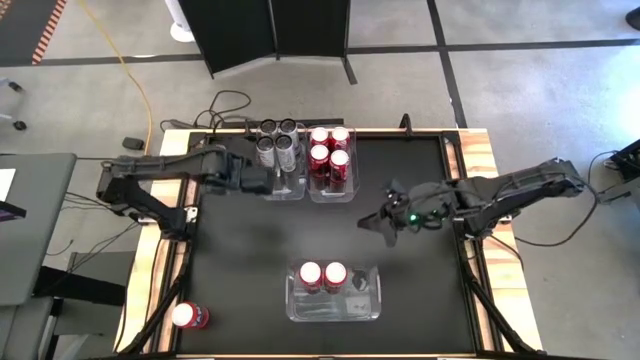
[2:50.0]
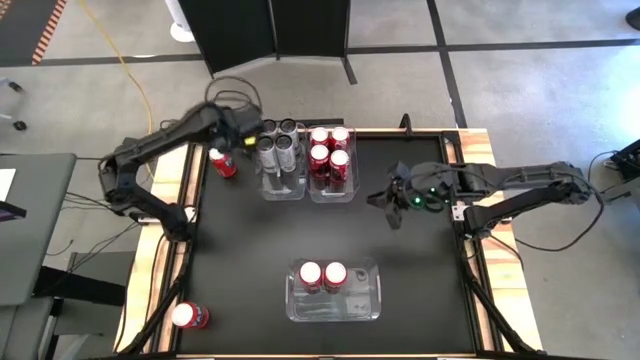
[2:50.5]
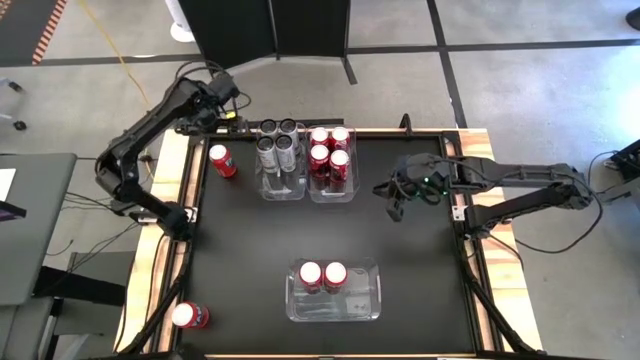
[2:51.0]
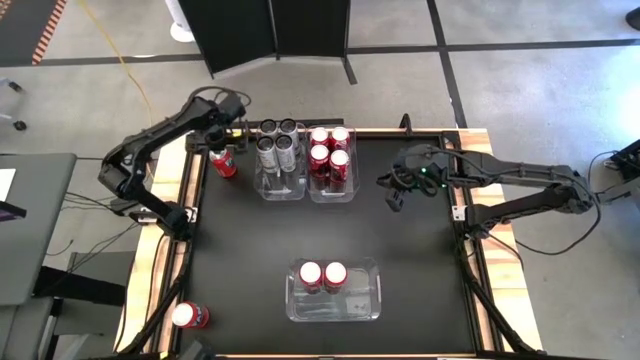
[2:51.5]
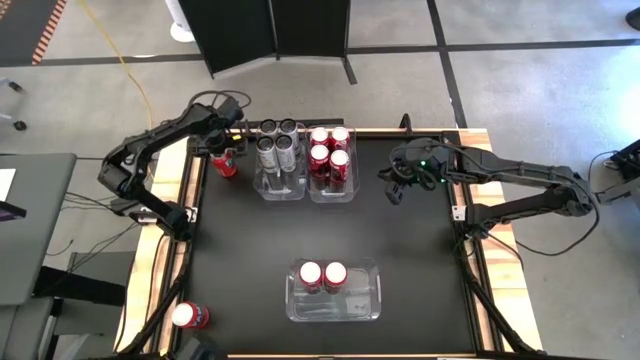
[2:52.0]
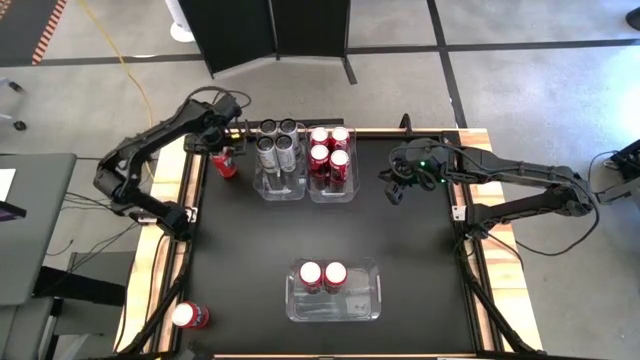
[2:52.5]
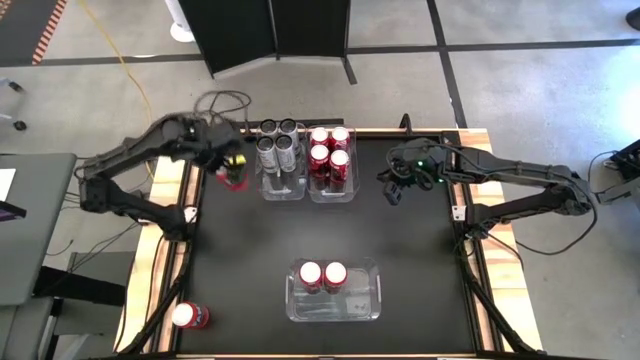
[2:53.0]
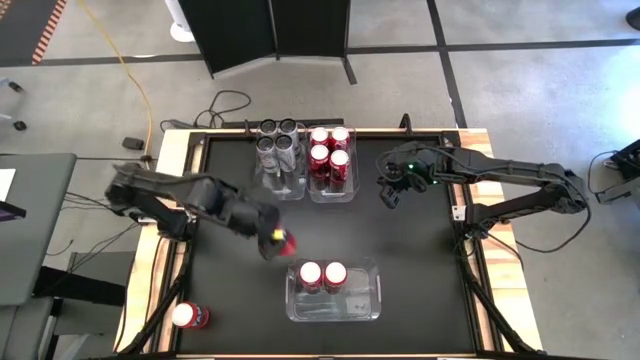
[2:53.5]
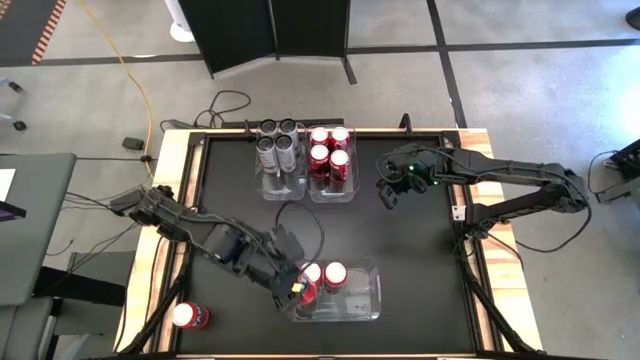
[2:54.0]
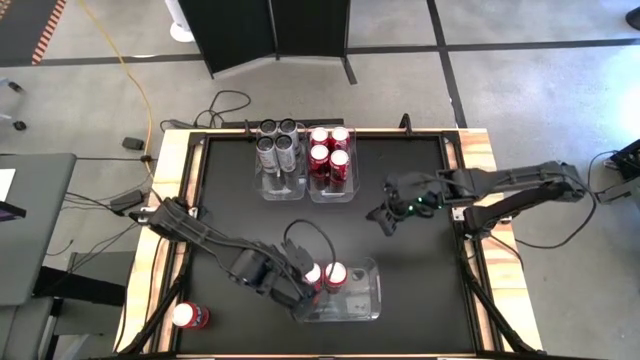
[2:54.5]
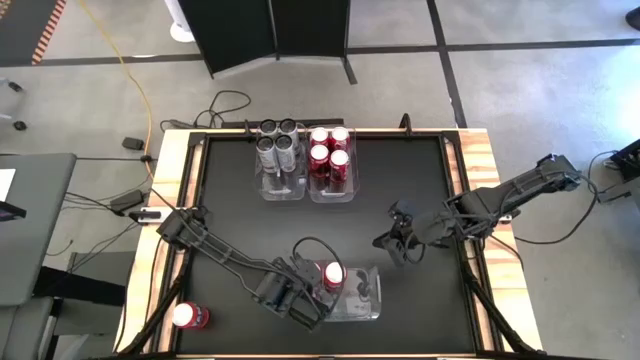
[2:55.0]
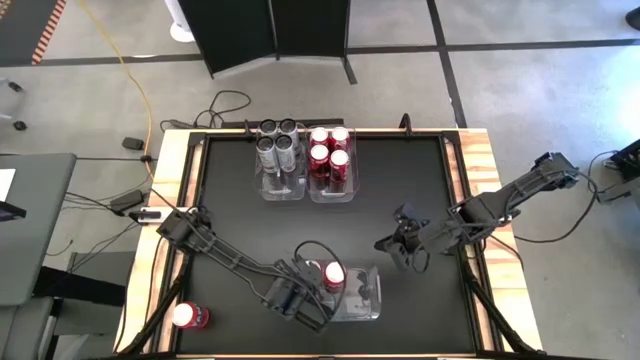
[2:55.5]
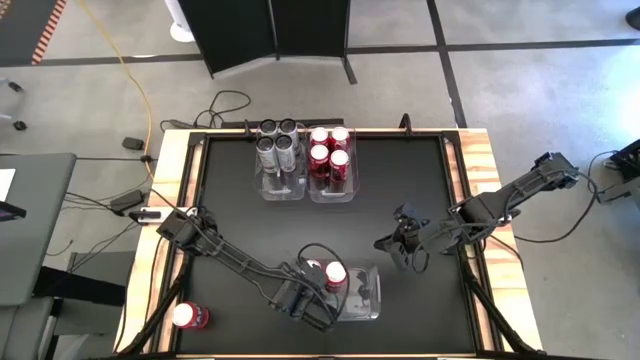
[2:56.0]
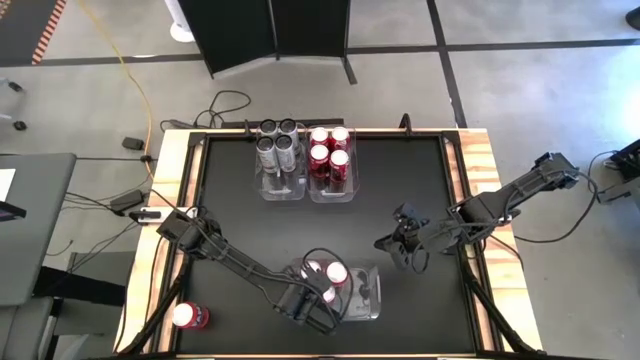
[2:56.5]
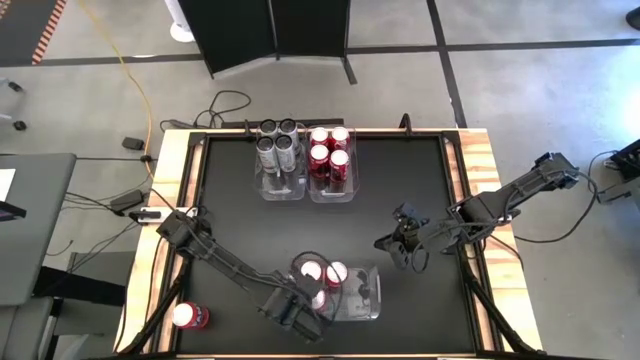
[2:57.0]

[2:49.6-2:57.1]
Task: Sort soda cans
Put the top orange soda can into the bottom transparent bin

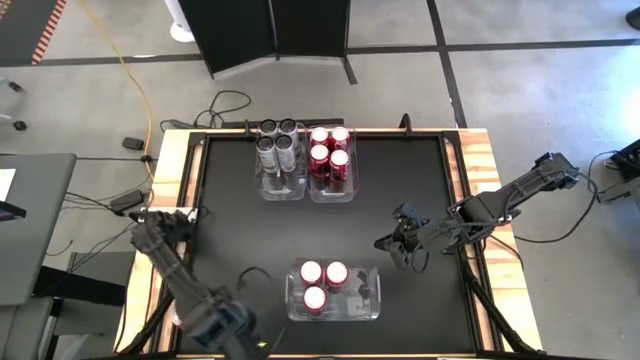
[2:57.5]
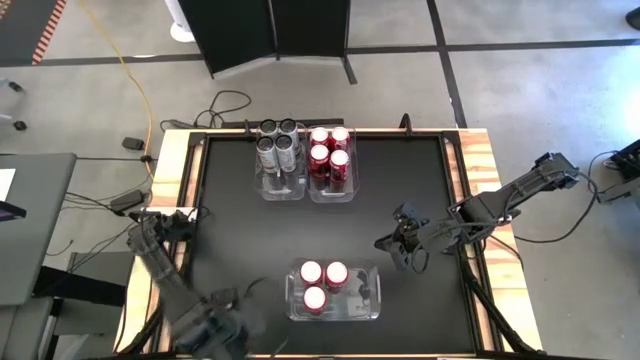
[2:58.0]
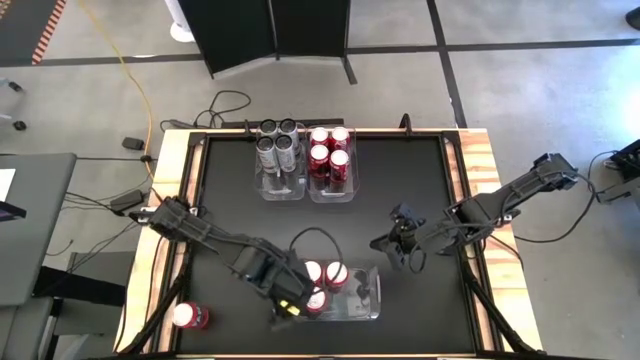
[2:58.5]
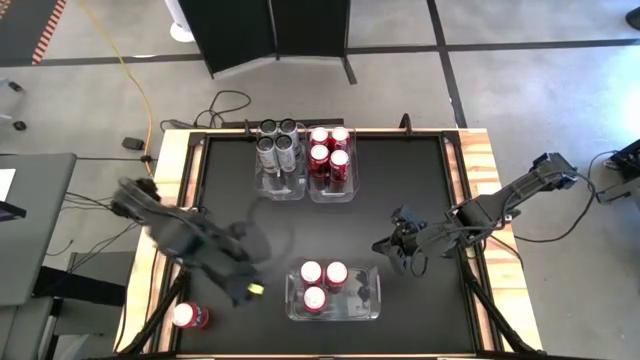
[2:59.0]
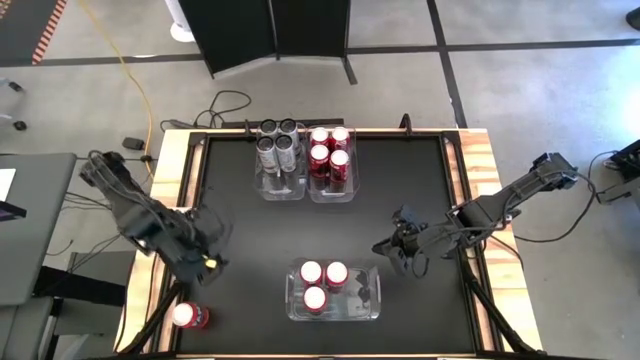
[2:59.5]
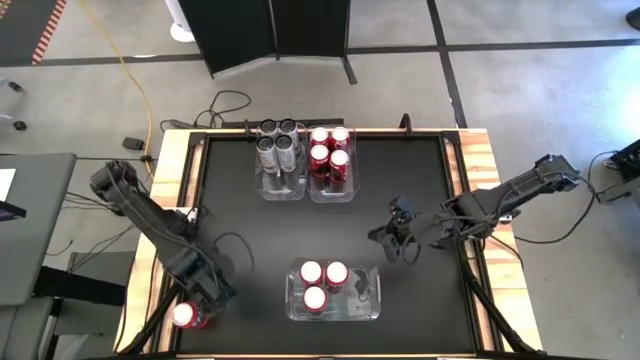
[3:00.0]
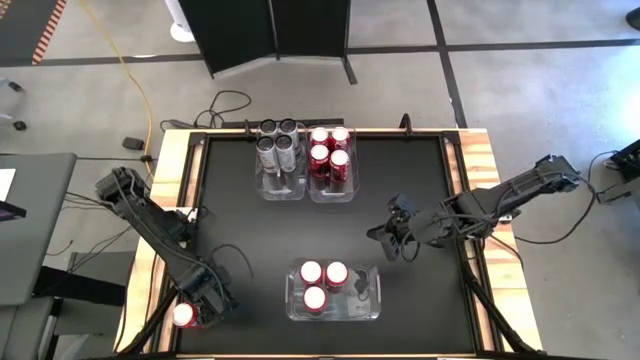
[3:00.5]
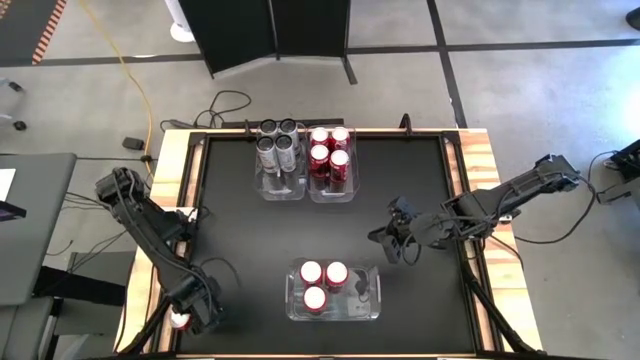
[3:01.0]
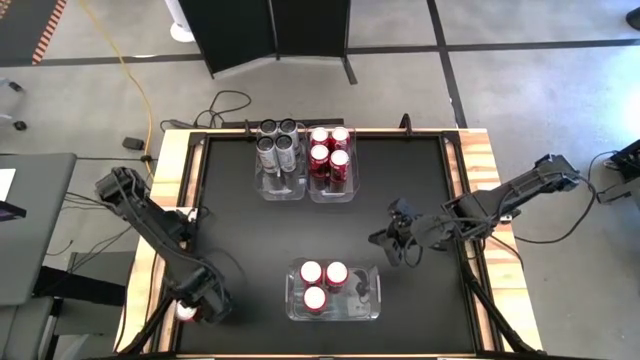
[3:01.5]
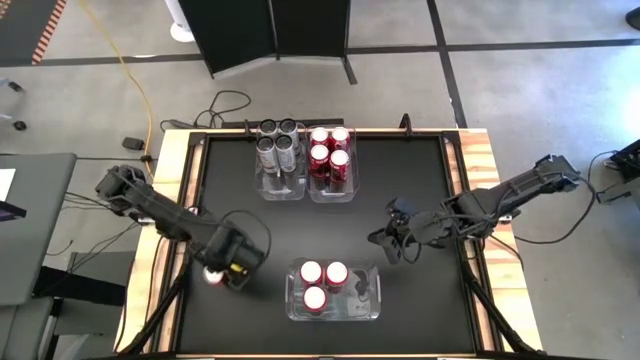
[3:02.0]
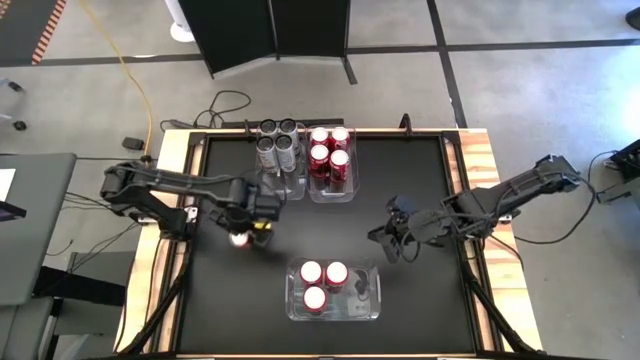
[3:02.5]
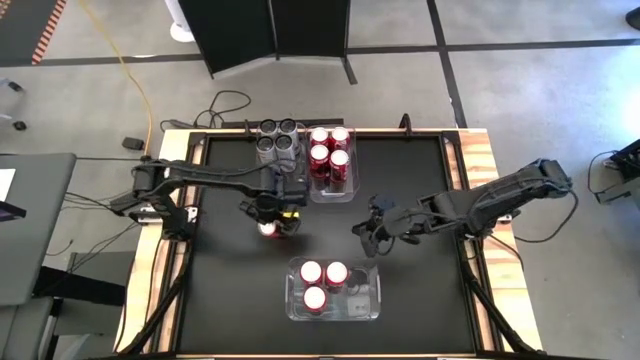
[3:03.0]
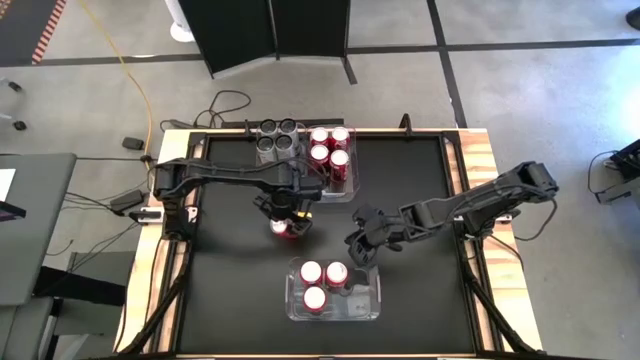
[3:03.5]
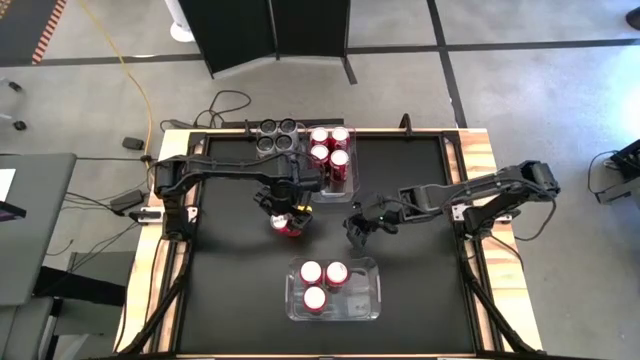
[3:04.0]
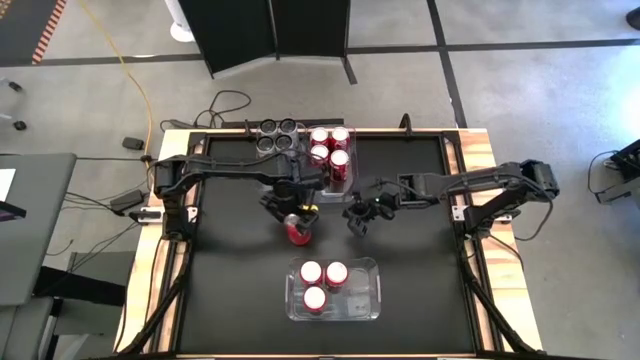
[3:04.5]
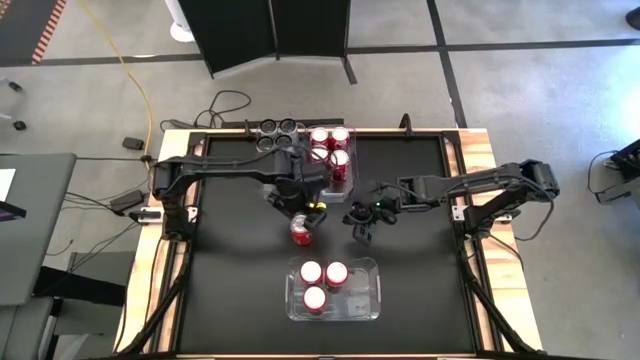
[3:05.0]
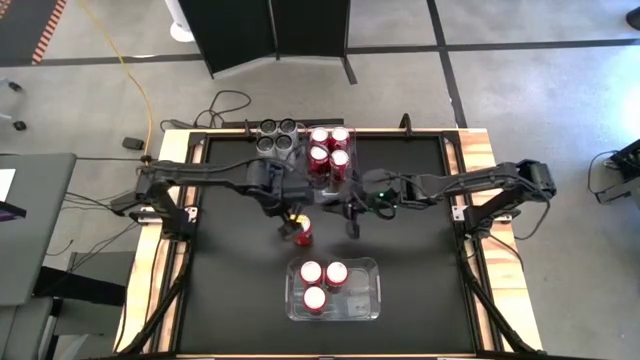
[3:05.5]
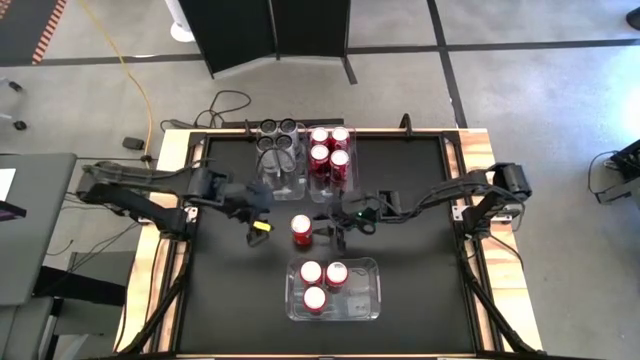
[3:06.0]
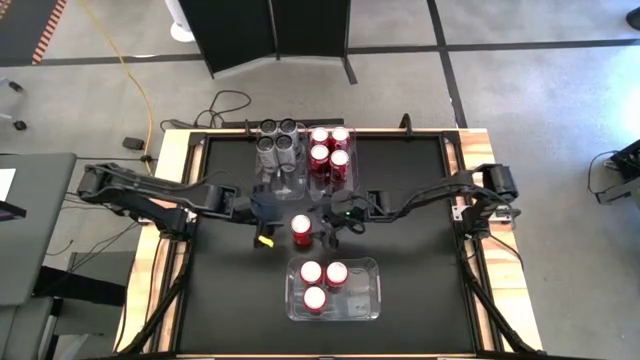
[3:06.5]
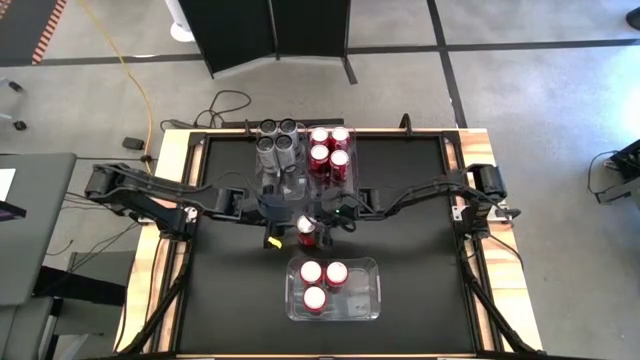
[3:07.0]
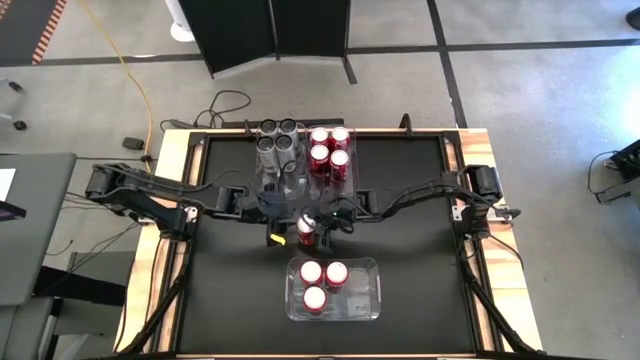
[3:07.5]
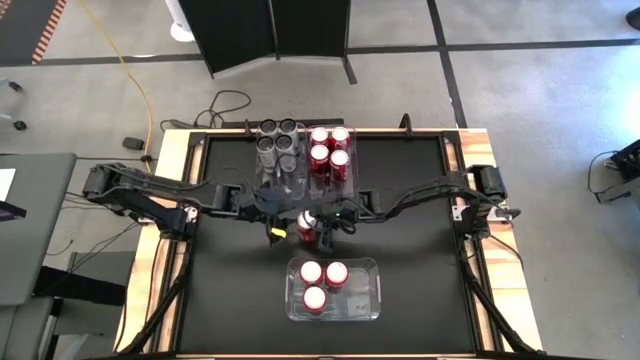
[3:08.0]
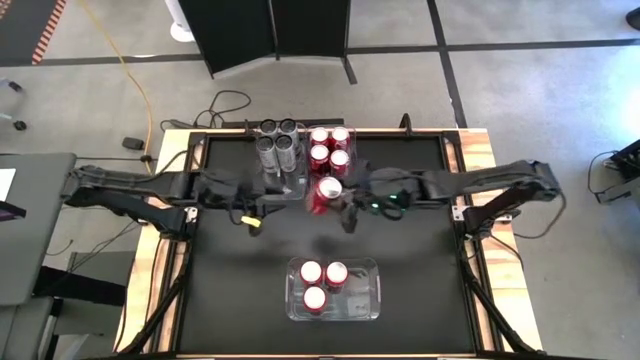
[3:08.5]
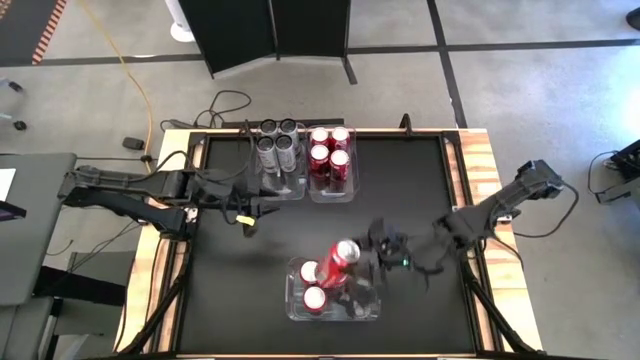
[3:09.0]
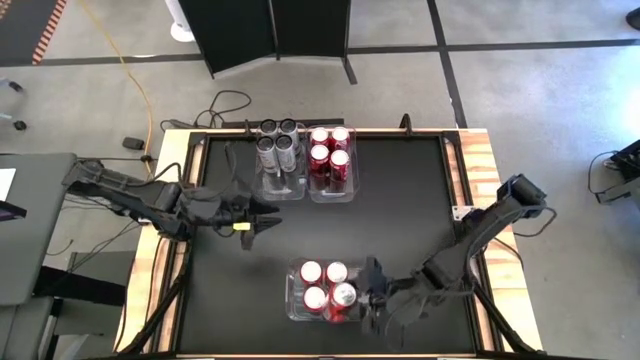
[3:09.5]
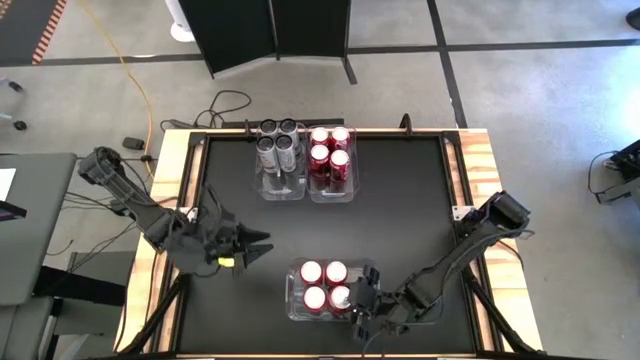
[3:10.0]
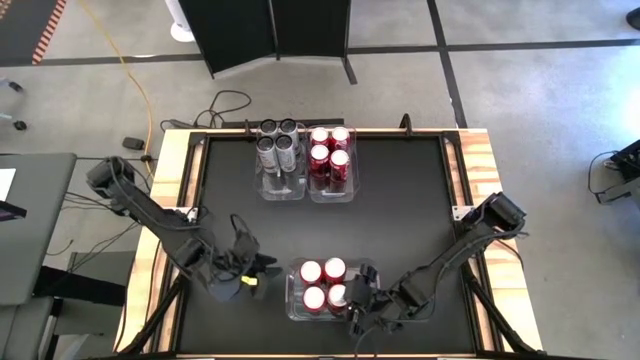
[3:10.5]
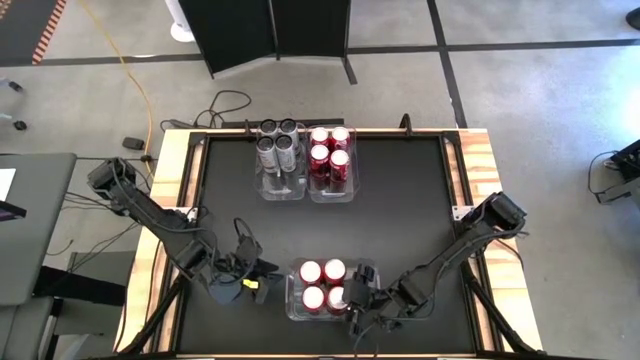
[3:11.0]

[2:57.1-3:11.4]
Put the orange soda can into the bottom center transparent bin

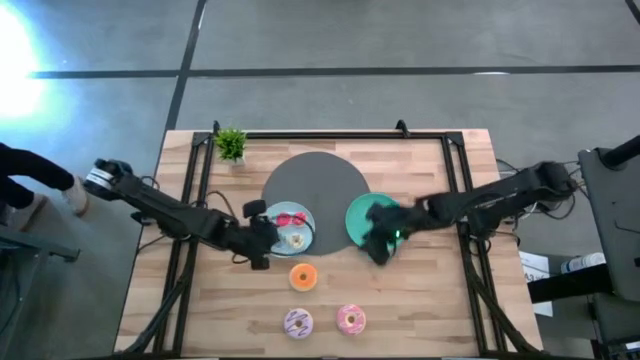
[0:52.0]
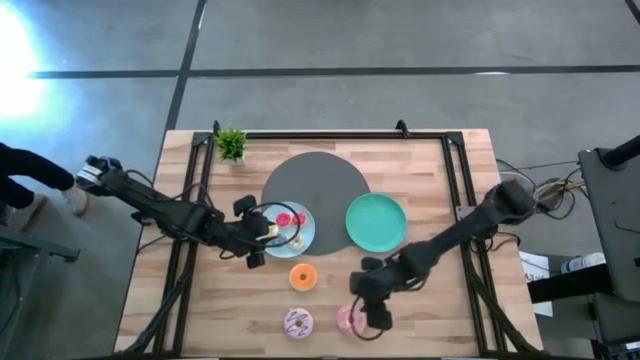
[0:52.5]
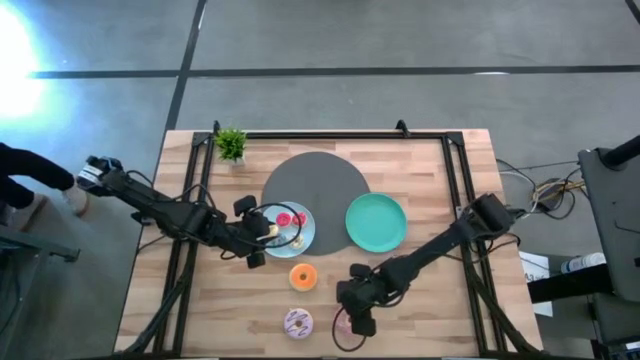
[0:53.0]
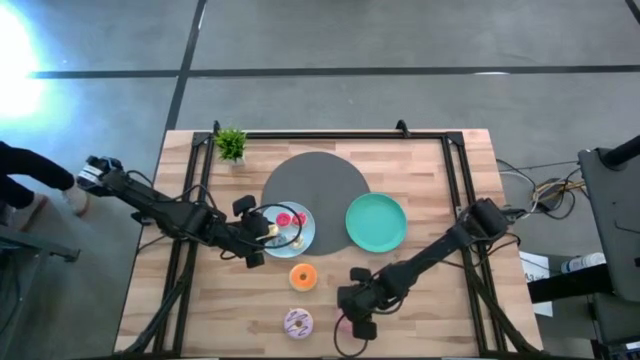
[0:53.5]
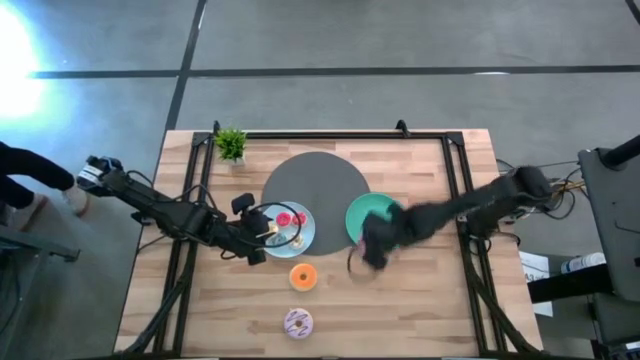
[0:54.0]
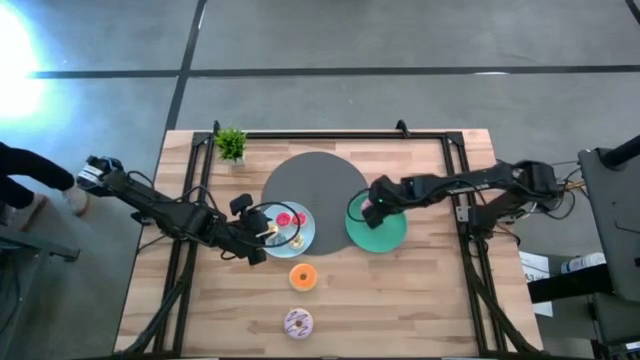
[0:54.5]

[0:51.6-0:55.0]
Task: Pick & Place donuts
Put the big pink donut on the green plate
